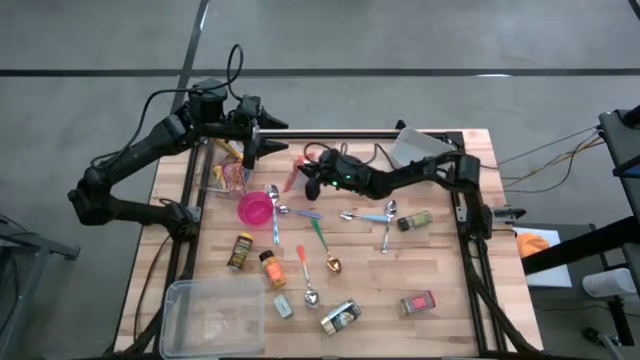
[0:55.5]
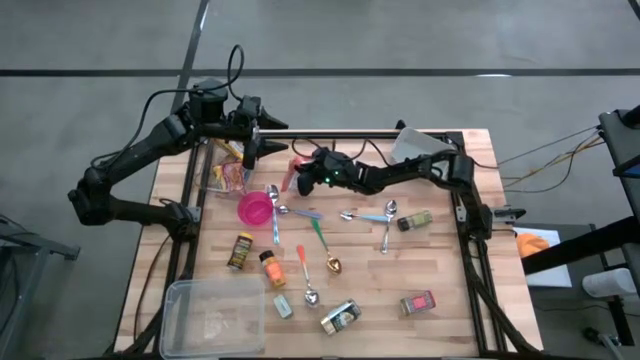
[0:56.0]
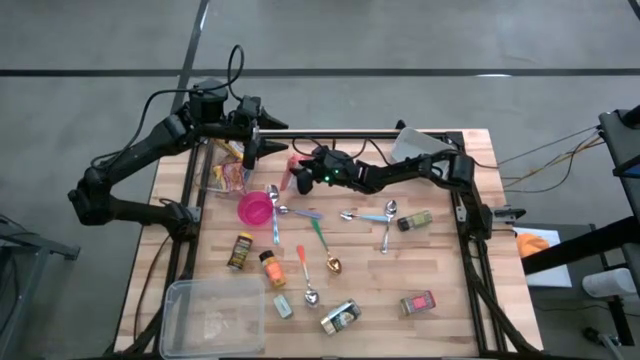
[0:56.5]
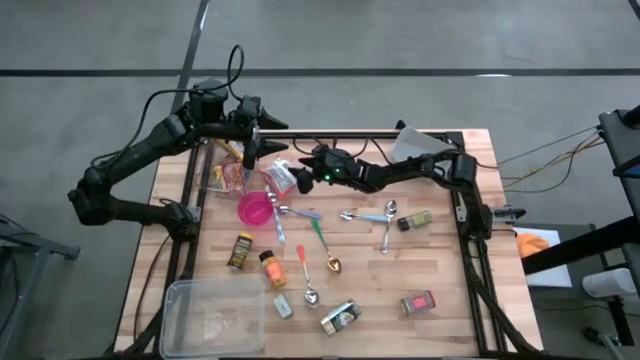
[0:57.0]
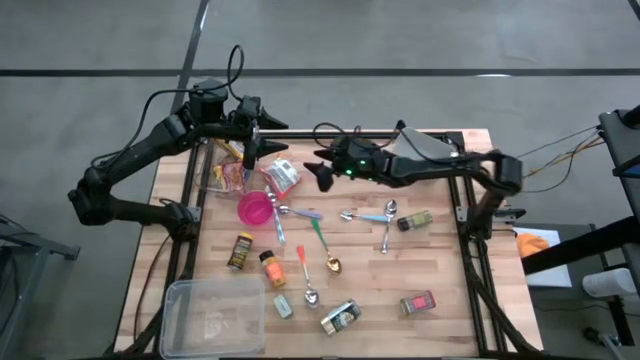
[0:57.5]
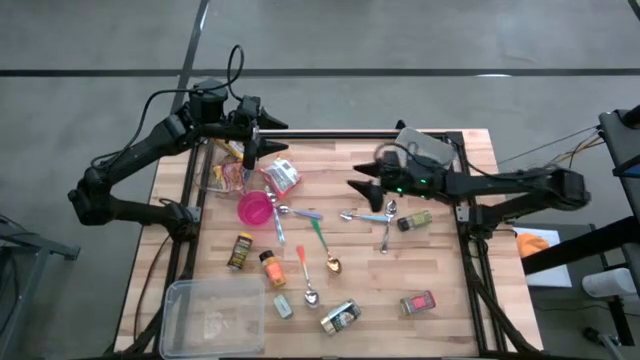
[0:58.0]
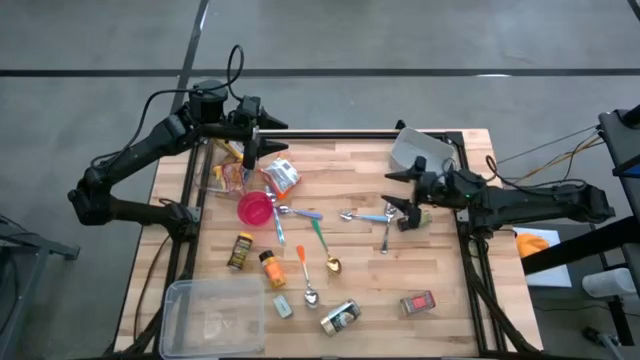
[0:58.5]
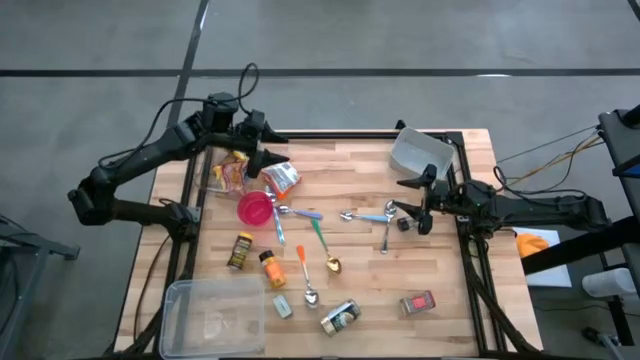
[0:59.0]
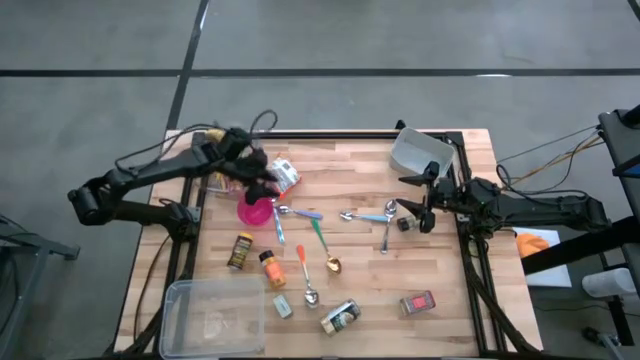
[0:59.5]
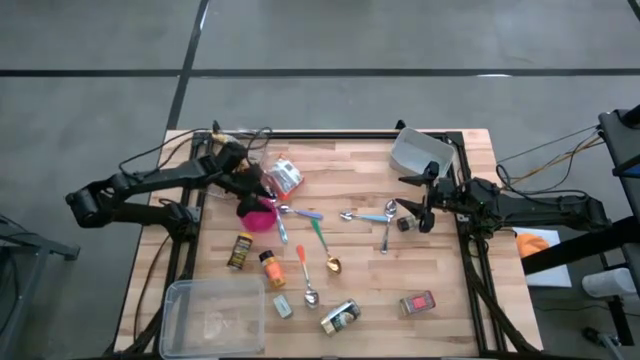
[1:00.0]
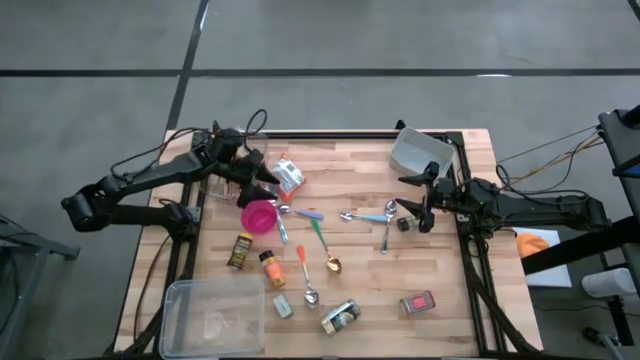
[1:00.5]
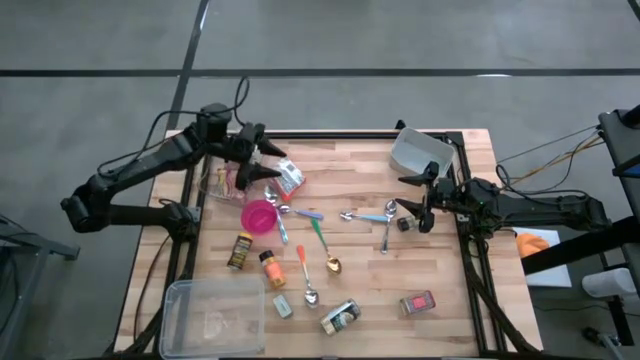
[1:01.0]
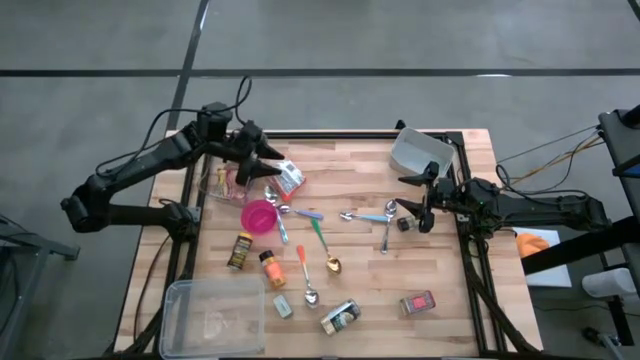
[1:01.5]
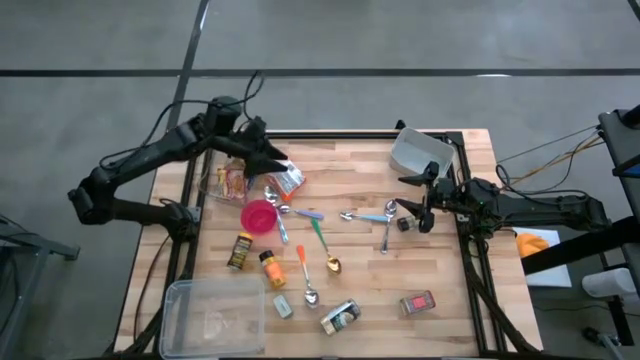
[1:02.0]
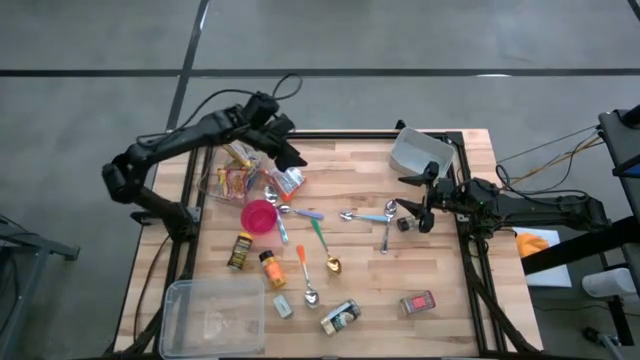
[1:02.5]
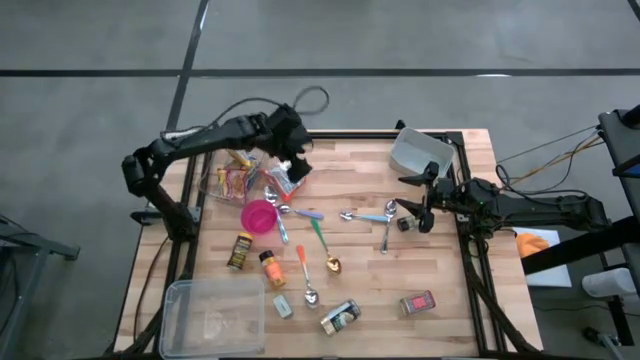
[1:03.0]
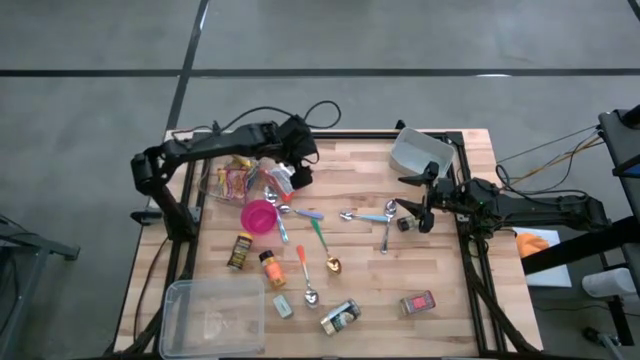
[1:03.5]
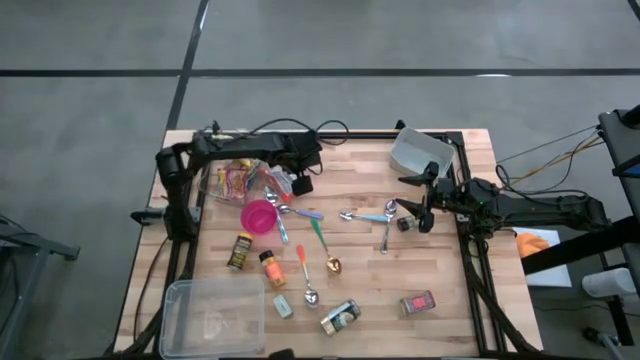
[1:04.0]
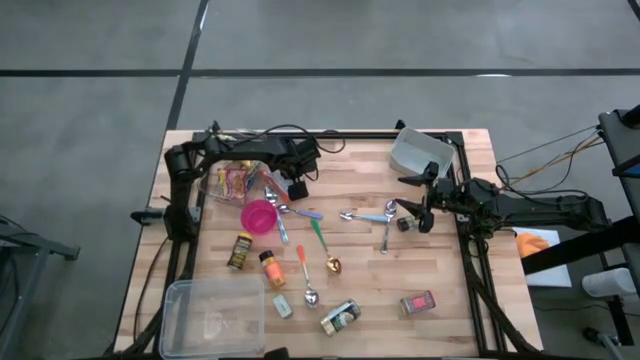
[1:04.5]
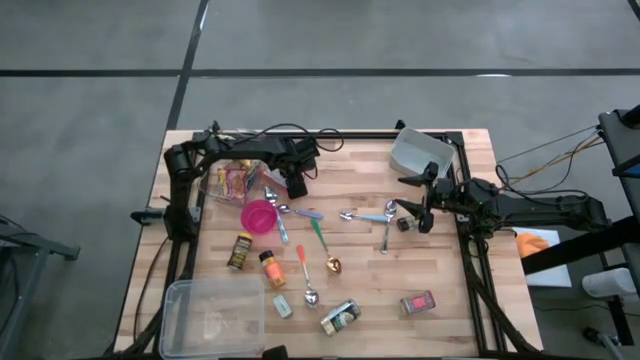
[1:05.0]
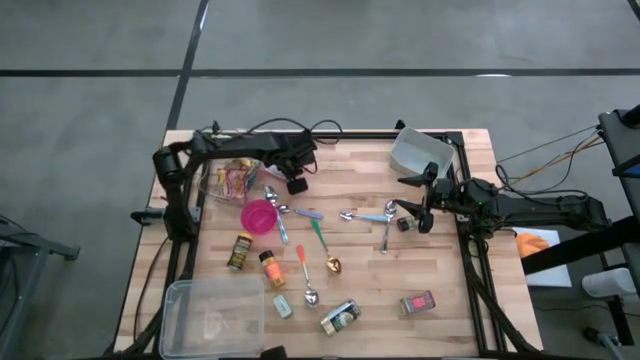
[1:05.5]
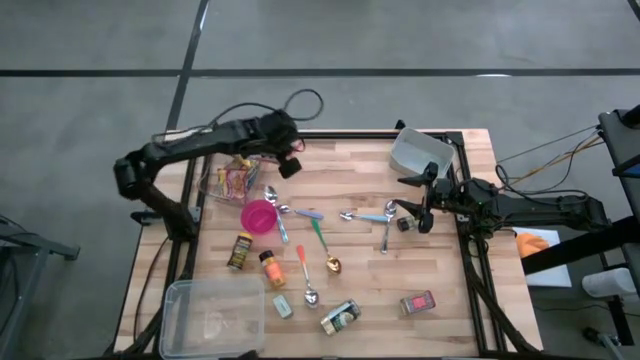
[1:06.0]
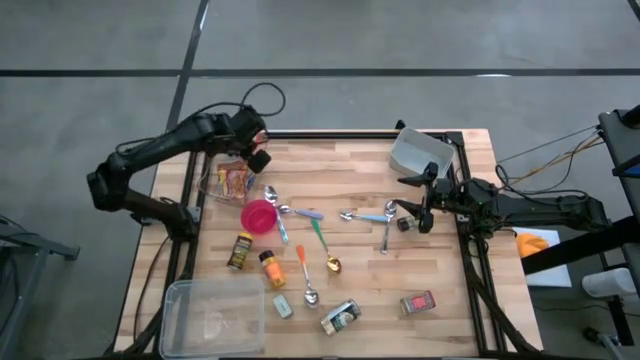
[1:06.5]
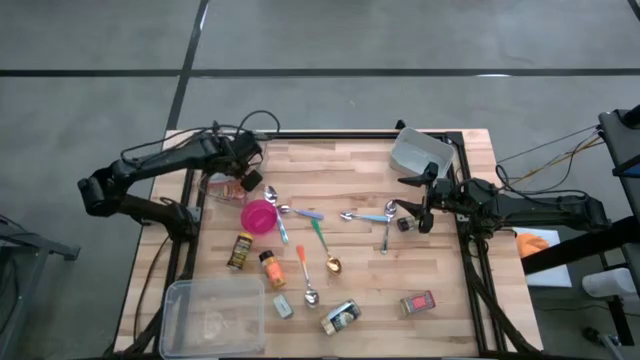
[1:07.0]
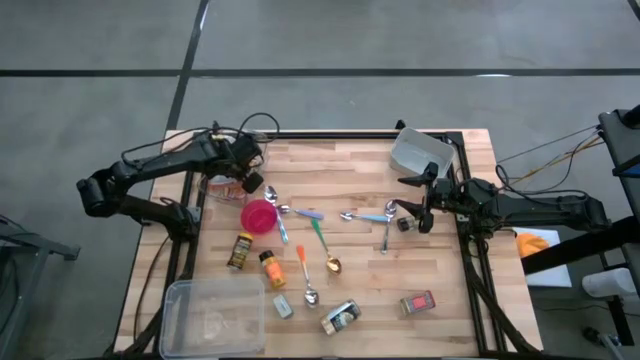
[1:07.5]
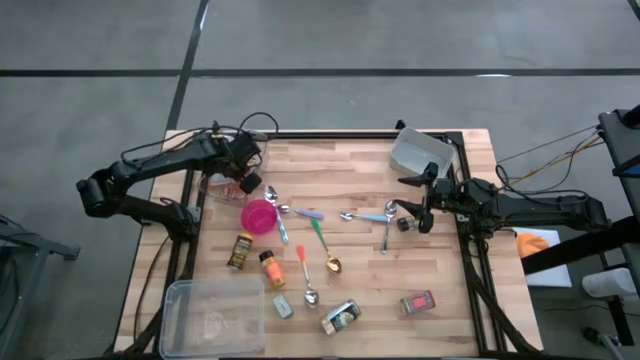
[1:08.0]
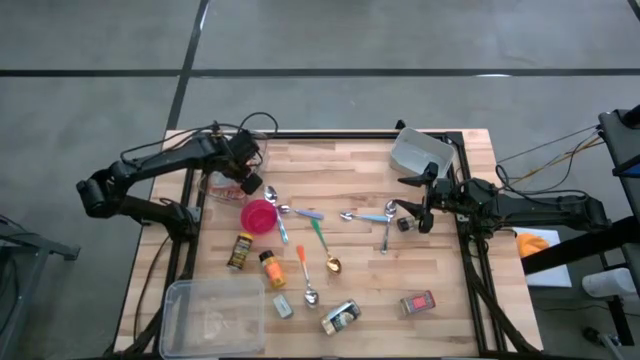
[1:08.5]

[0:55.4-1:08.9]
Put the orange noodle pack into the clear bin

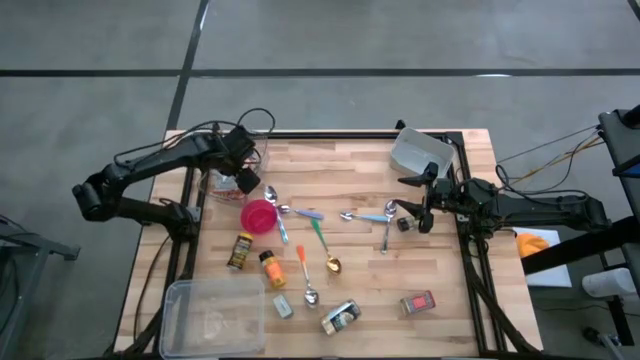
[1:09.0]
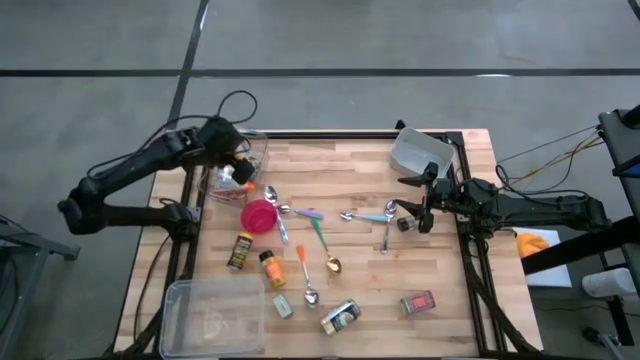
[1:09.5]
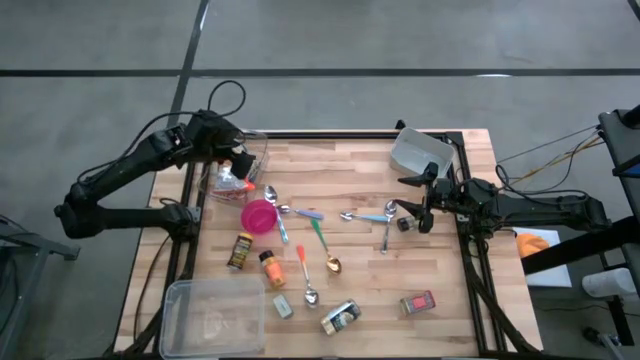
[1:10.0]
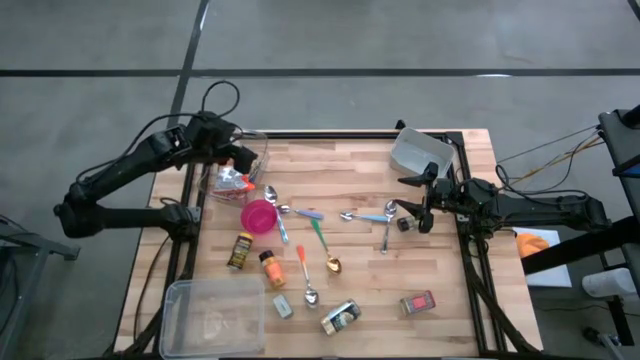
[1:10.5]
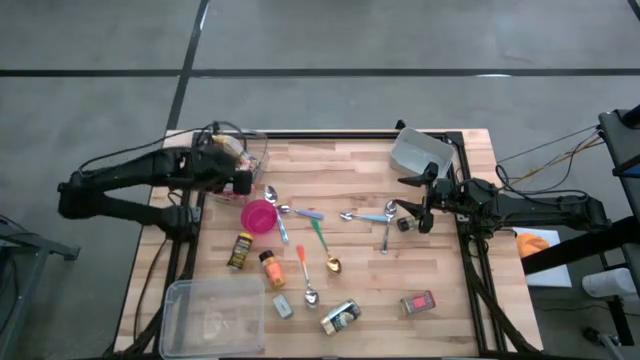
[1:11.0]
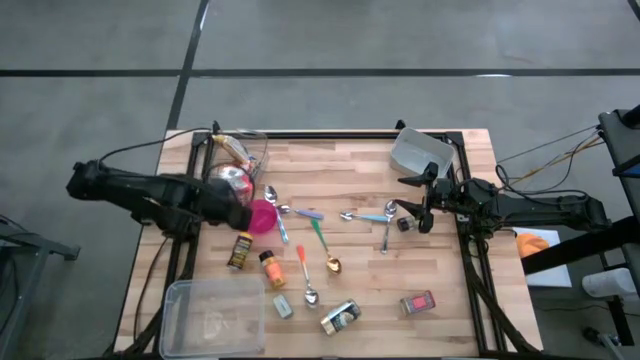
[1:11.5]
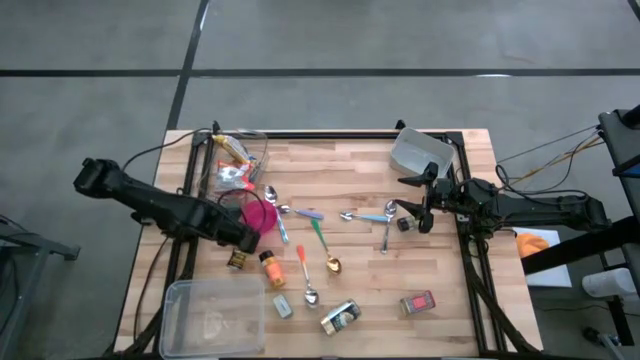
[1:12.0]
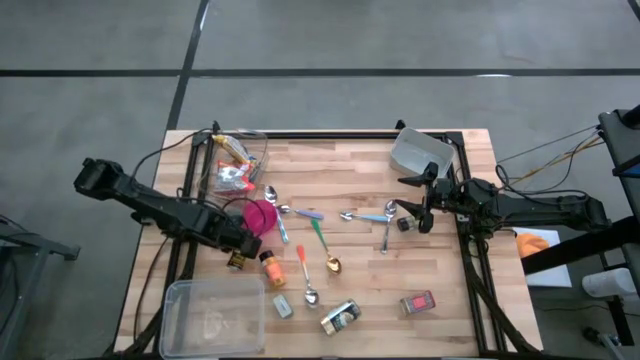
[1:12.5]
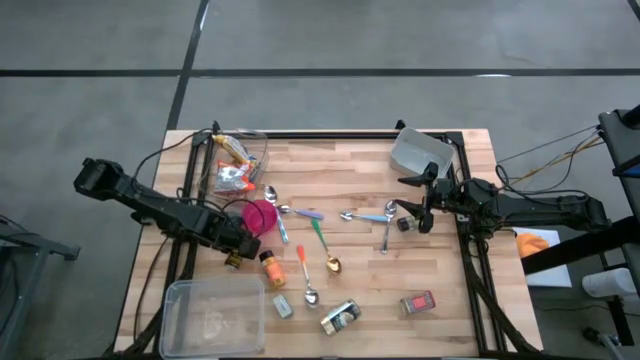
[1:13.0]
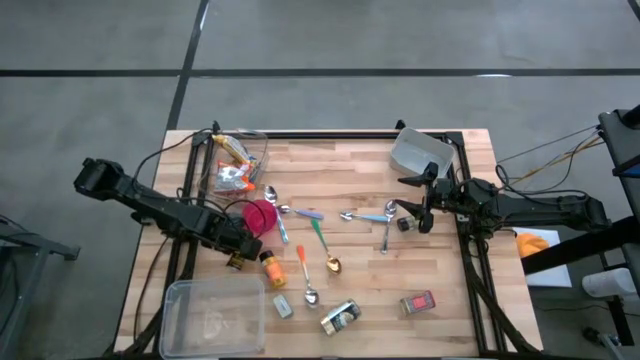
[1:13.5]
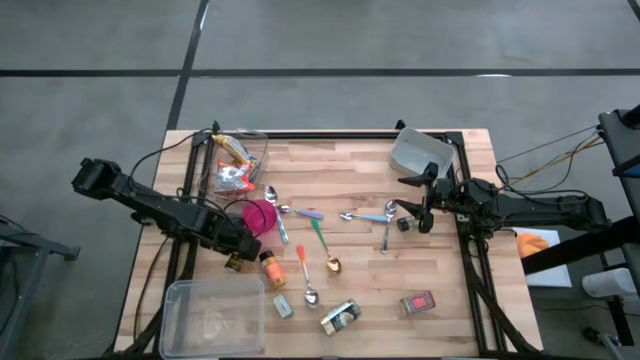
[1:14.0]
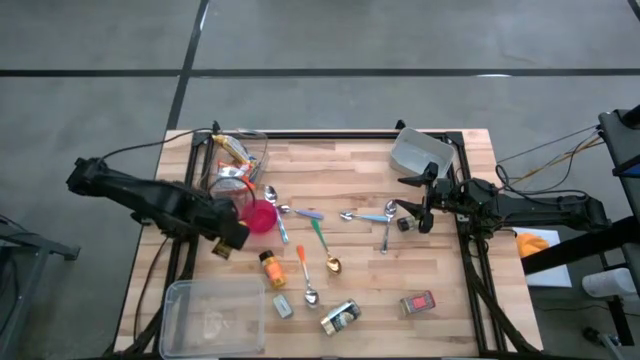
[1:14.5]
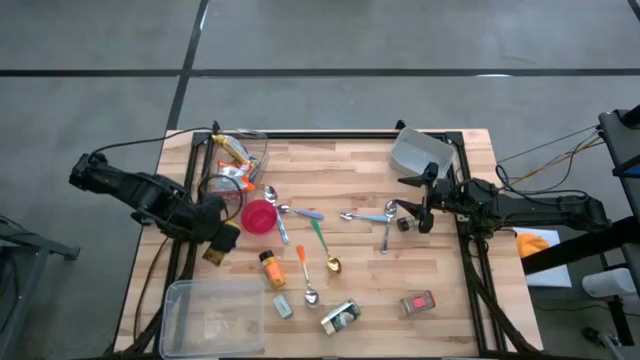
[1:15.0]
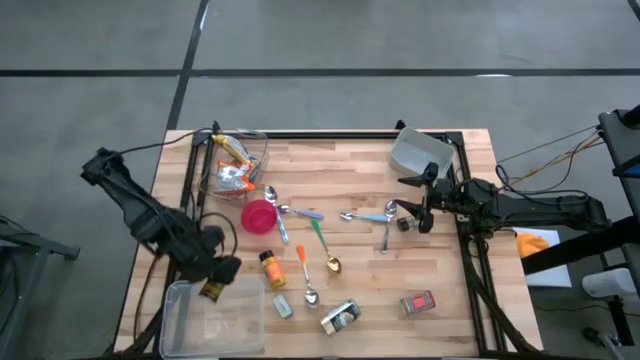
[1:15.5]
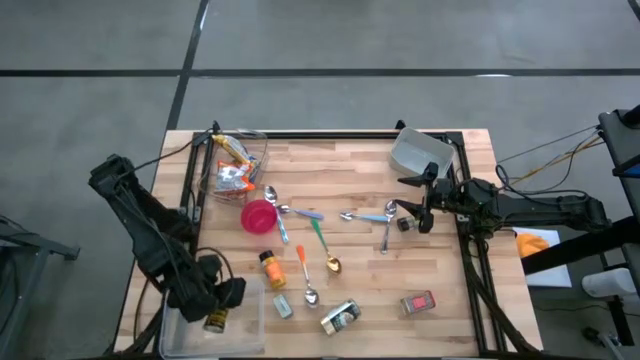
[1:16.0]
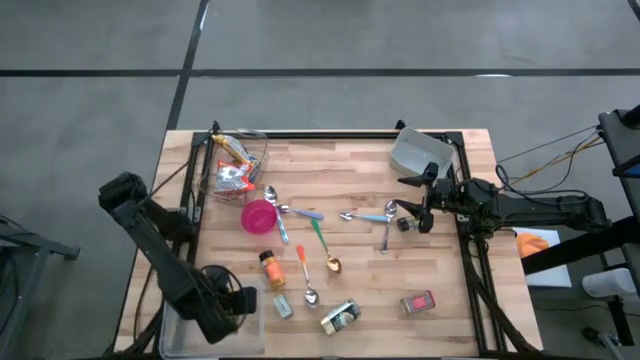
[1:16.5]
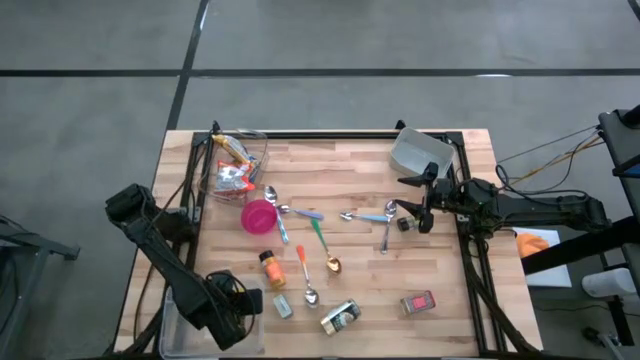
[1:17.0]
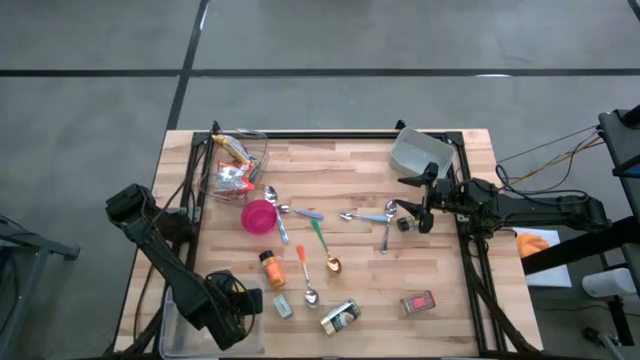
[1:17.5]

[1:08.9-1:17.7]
Put the yellow seasoning can into the white bin
